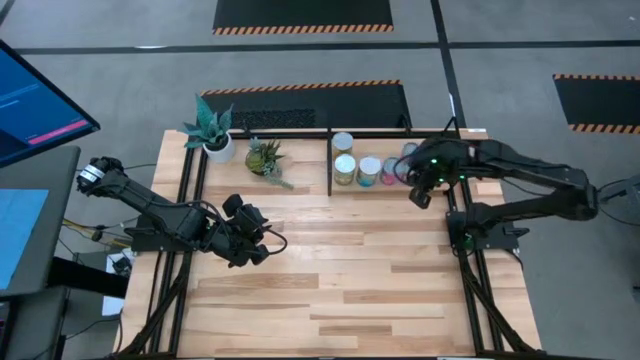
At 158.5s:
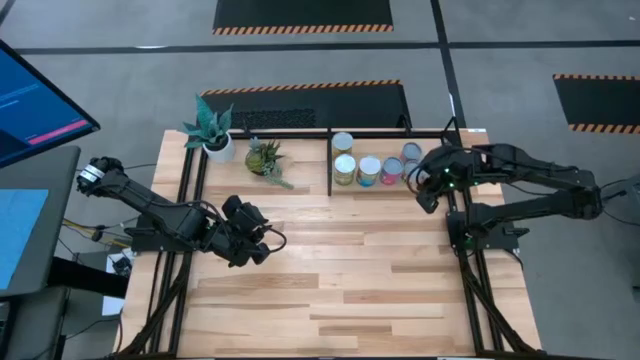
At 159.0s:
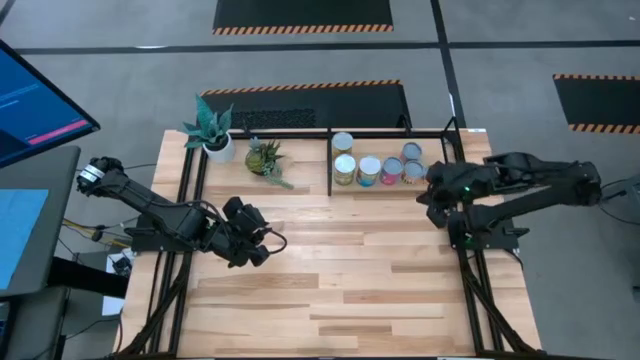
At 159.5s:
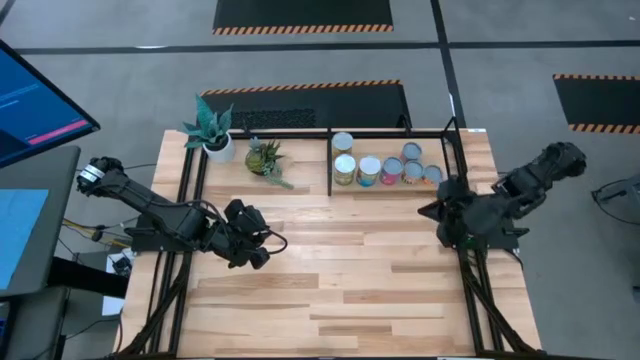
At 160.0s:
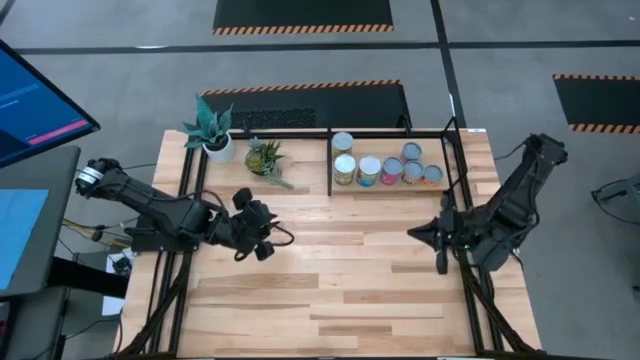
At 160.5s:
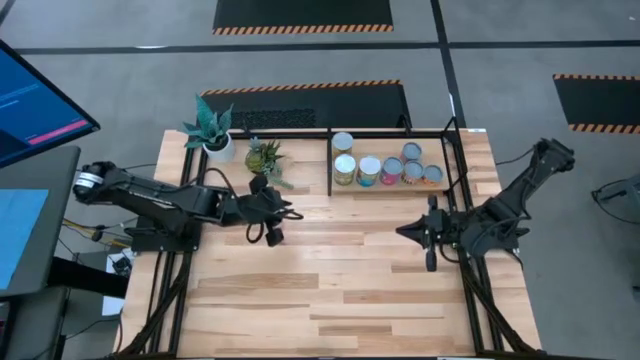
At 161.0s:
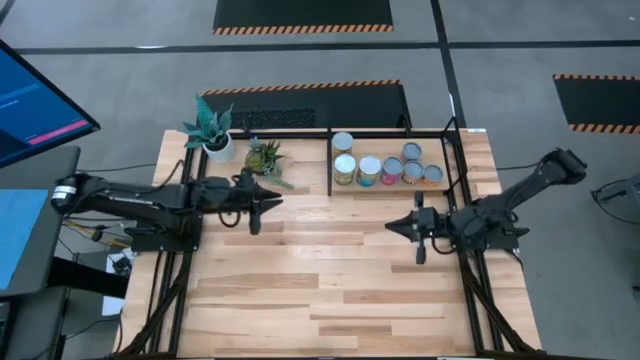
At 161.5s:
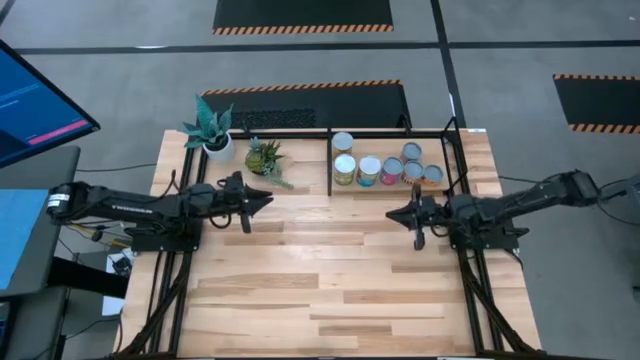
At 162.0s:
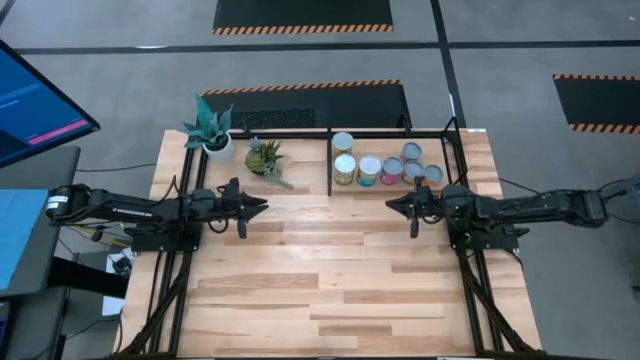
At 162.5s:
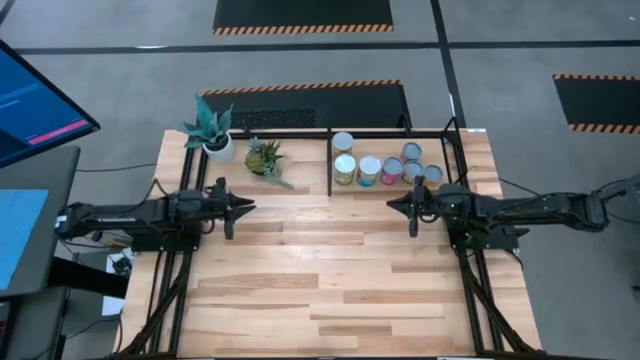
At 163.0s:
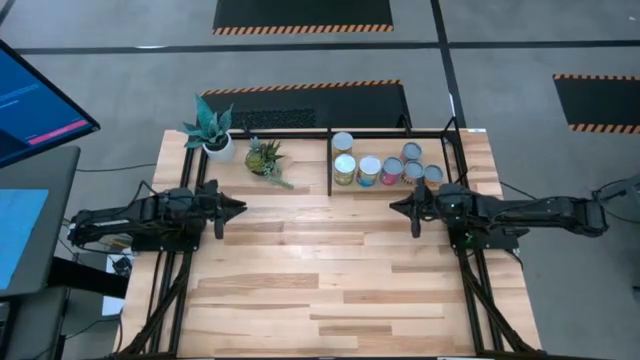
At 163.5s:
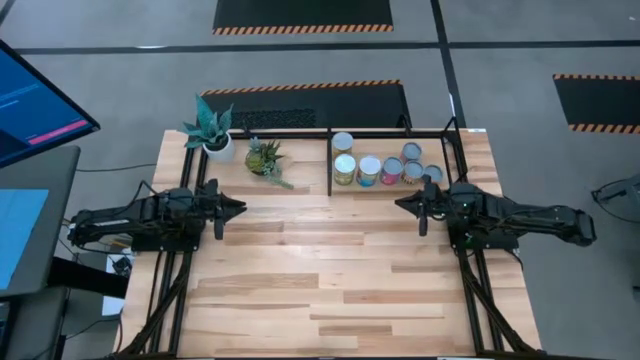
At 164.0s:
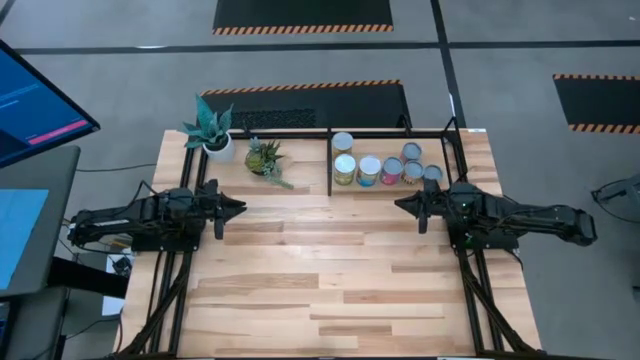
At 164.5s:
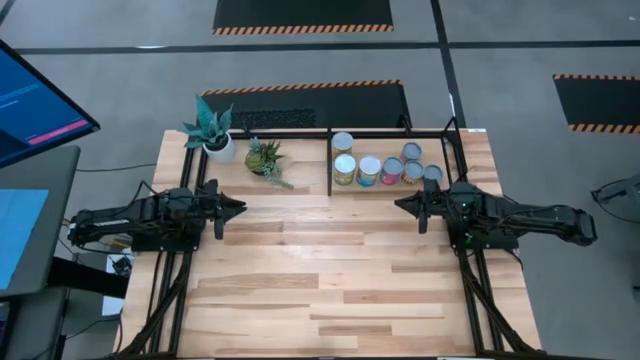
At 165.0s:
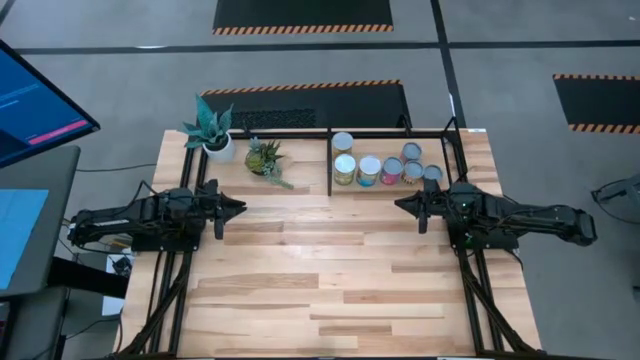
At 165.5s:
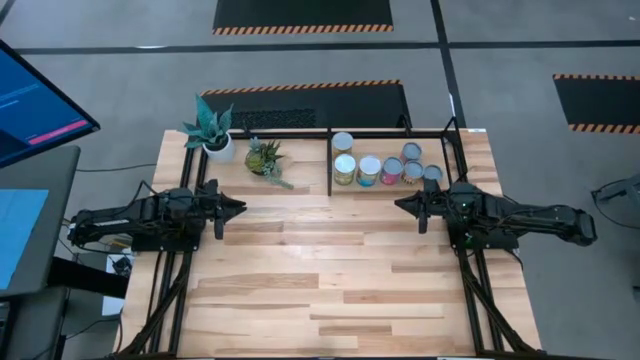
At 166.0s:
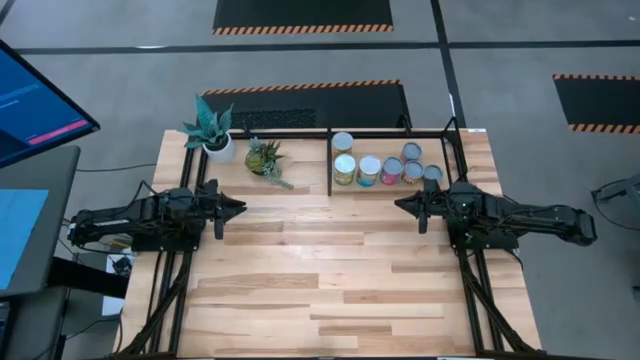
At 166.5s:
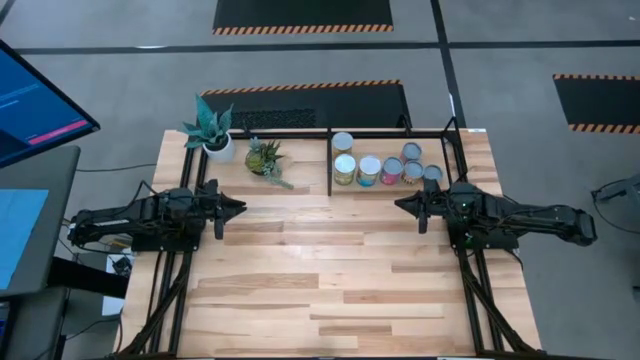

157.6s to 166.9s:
Task: Pick and place cans onto a shelf
Return to Home Position

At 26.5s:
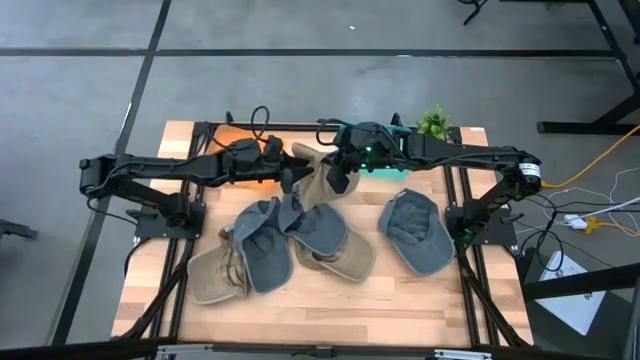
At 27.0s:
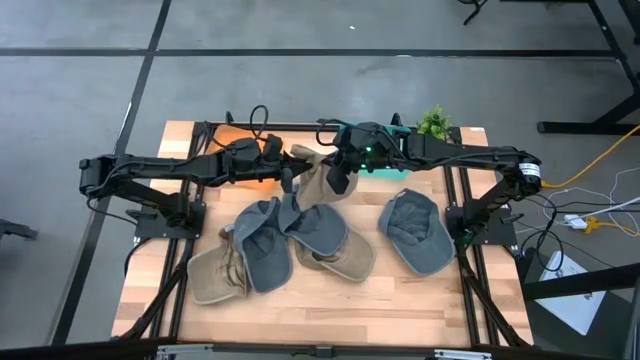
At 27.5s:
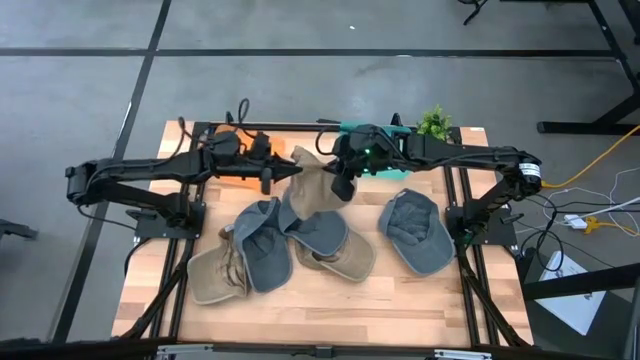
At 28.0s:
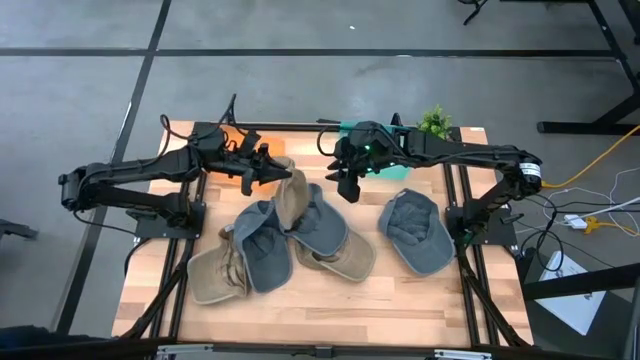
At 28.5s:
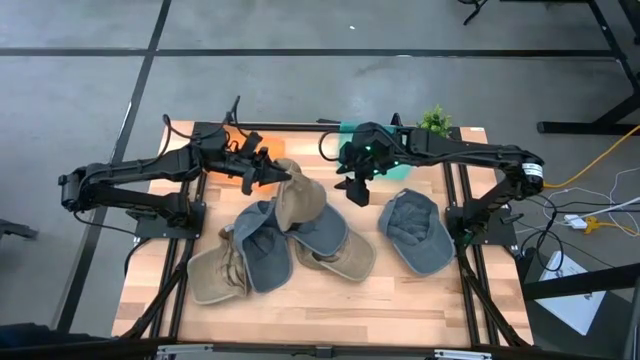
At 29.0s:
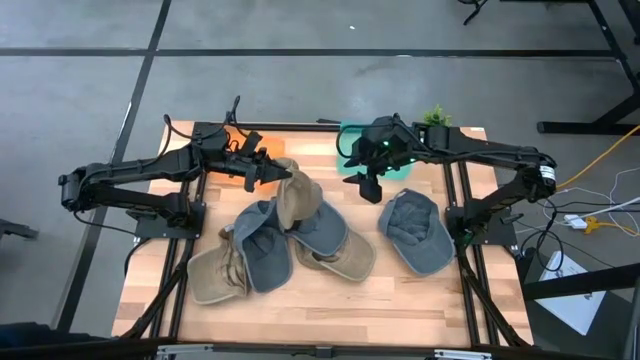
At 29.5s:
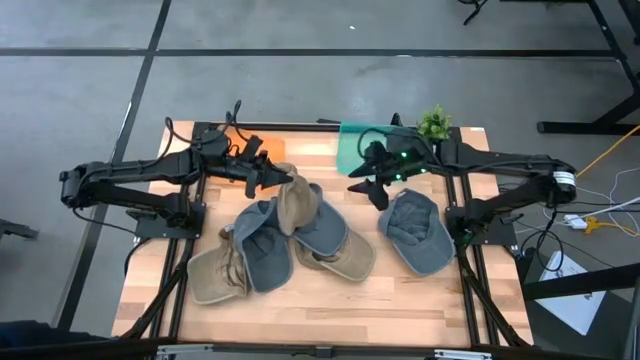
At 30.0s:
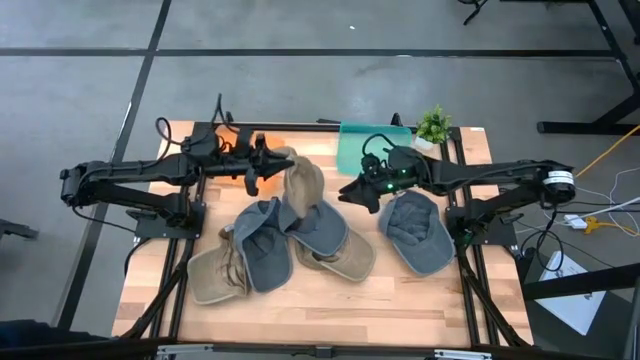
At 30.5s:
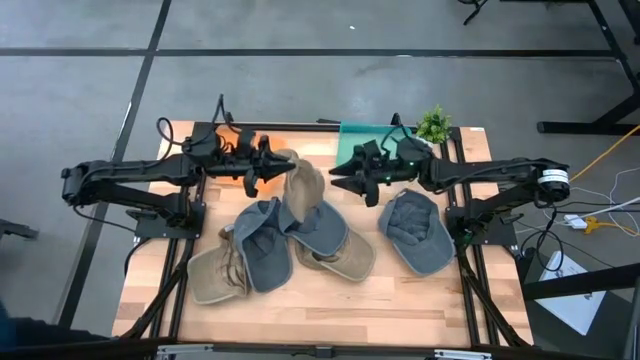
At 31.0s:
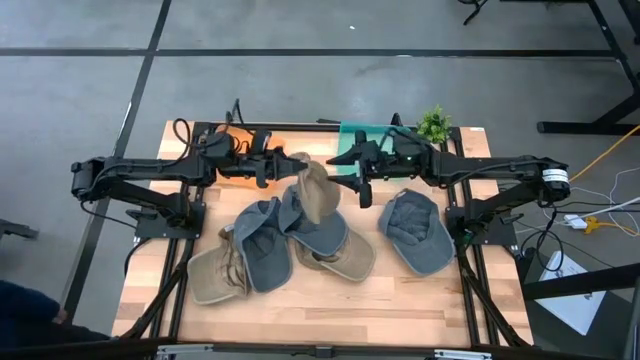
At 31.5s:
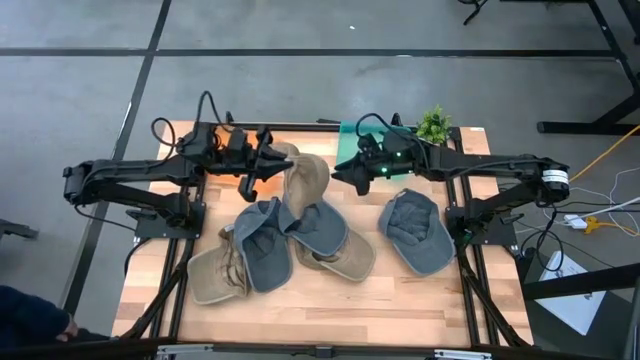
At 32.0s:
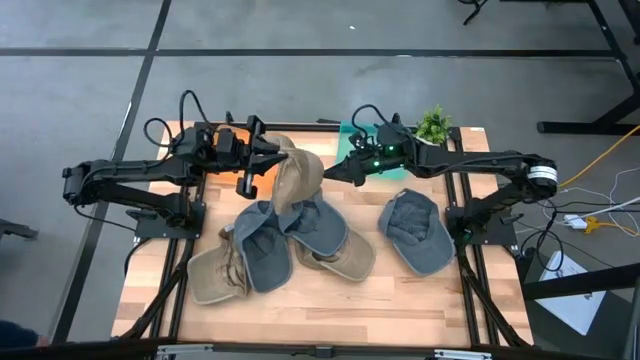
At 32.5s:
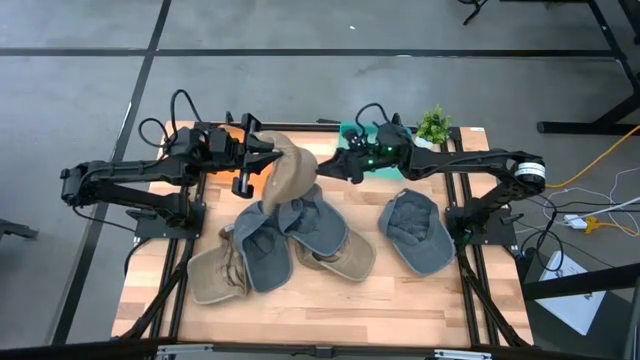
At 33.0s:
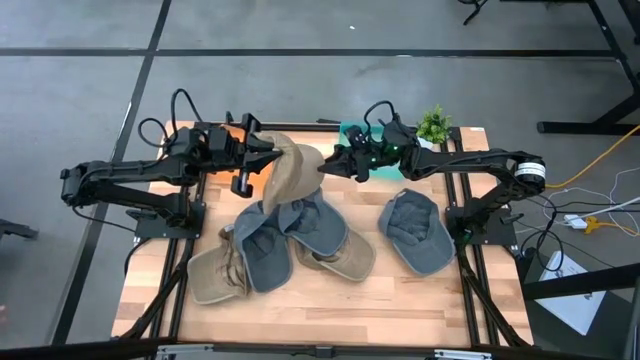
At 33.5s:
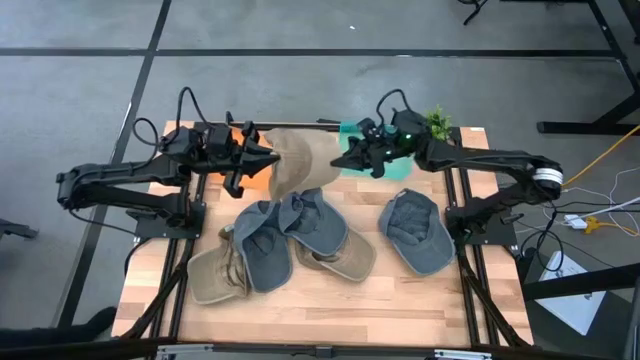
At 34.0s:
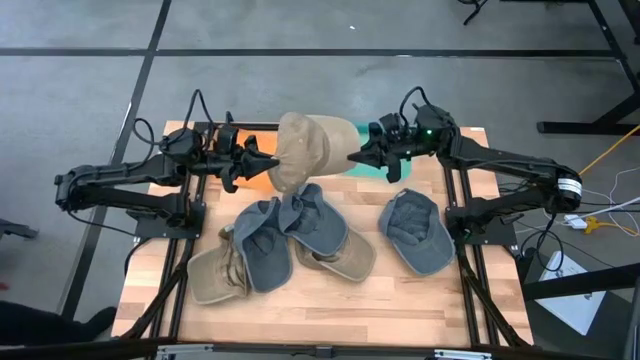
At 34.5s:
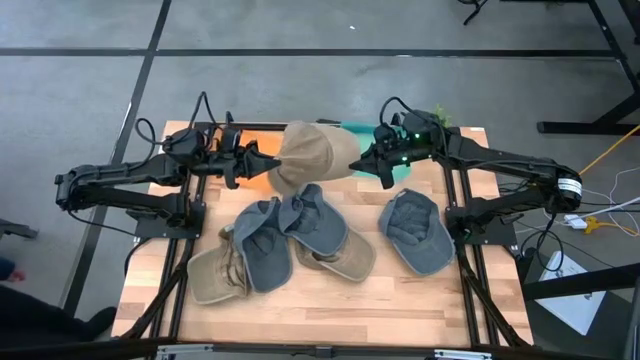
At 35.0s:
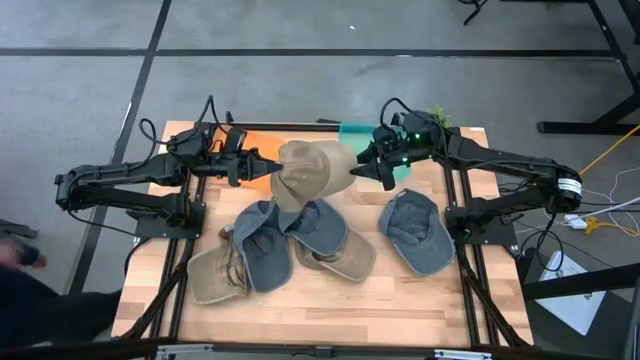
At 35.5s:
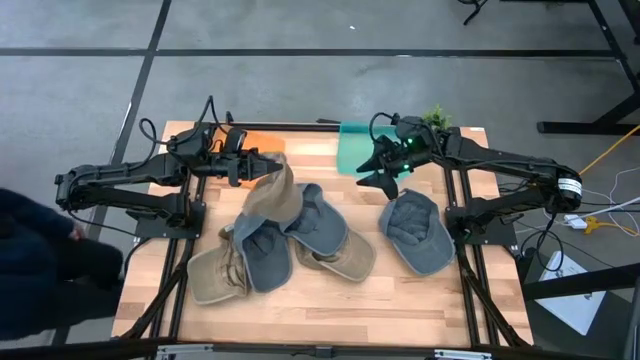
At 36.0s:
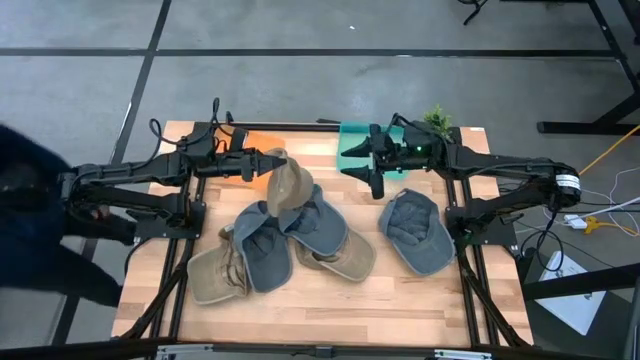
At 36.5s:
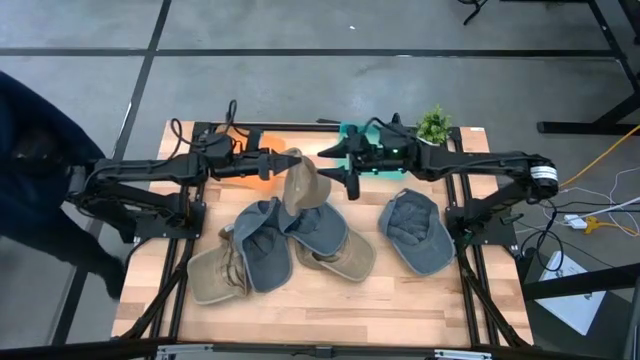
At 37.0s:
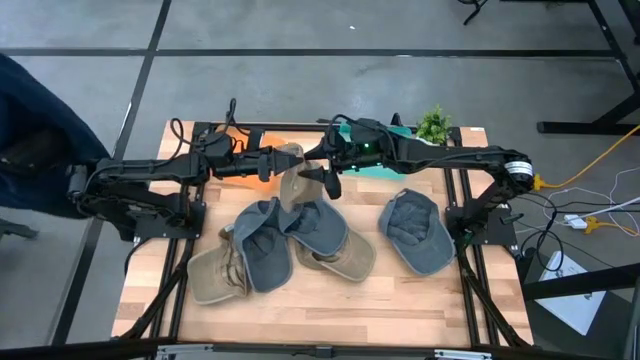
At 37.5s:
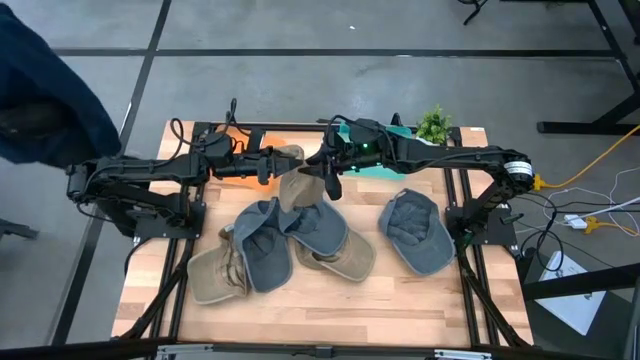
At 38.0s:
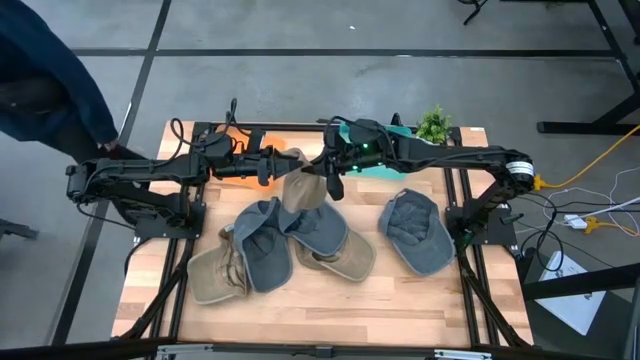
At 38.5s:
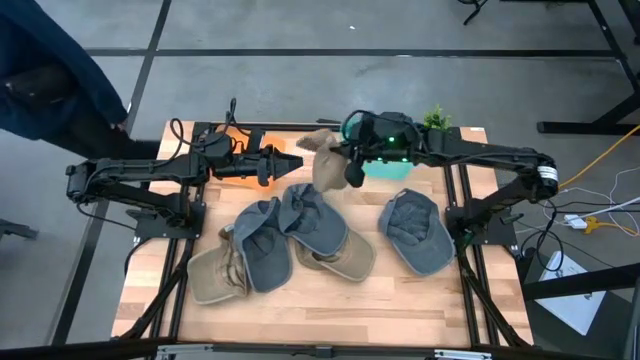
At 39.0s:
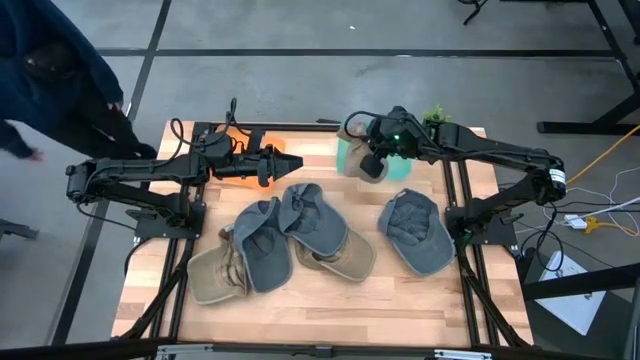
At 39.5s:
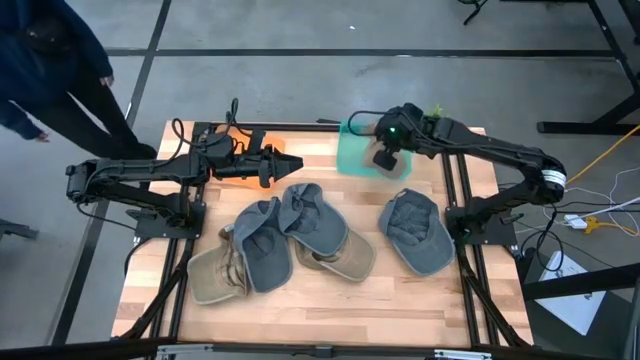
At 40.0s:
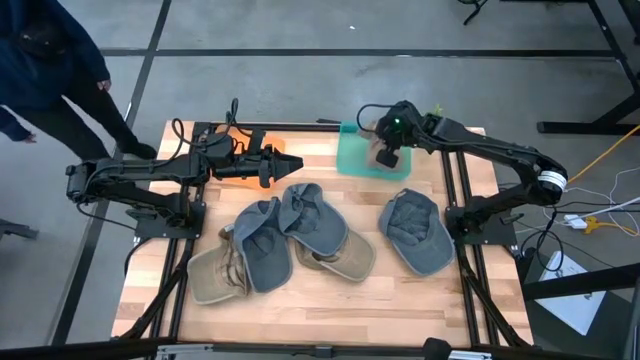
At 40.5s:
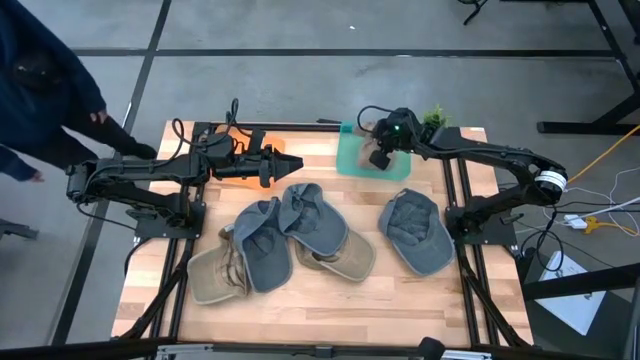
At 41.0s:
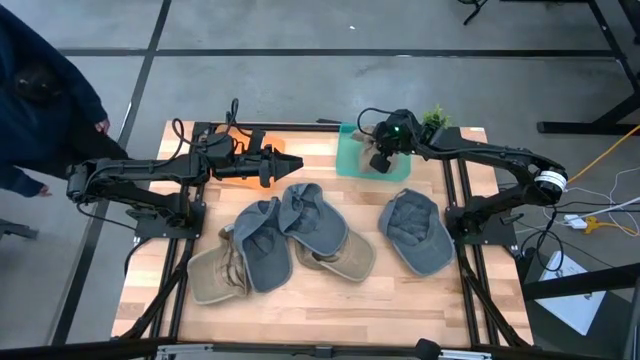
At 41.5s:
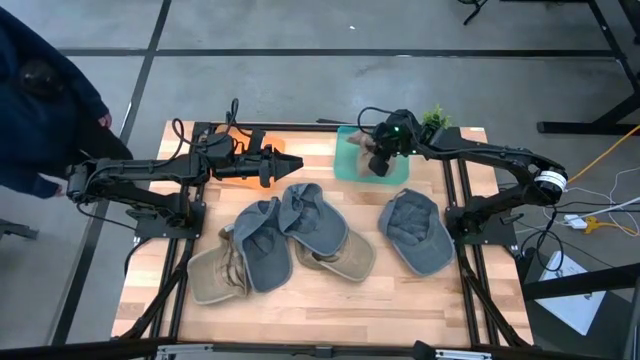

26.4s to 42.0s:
Task: Pick & Place hat
Put the top brown cap into the green bin
